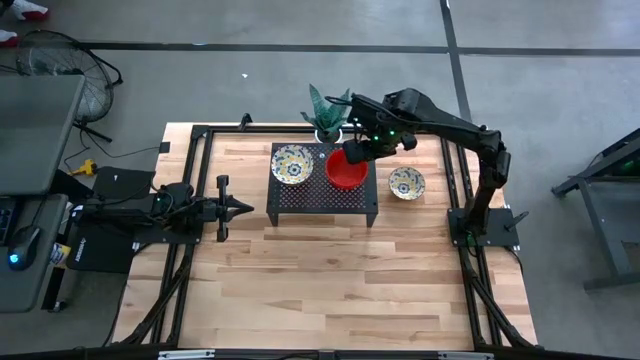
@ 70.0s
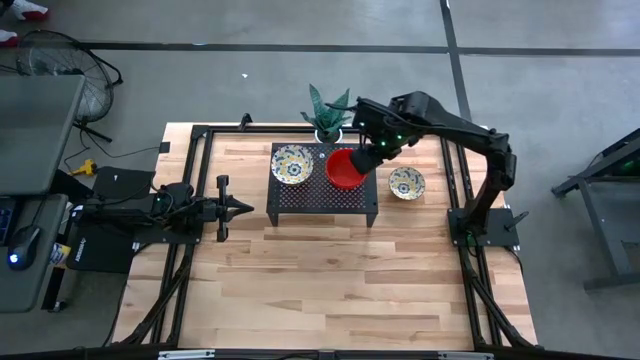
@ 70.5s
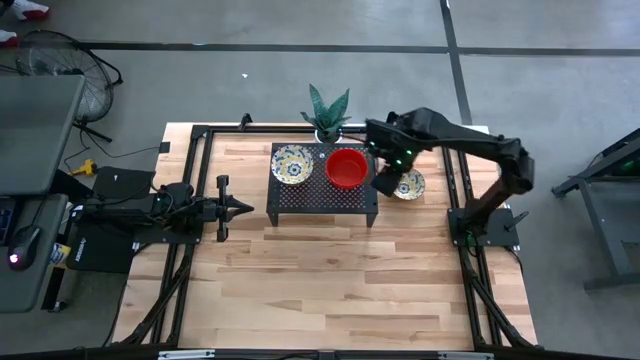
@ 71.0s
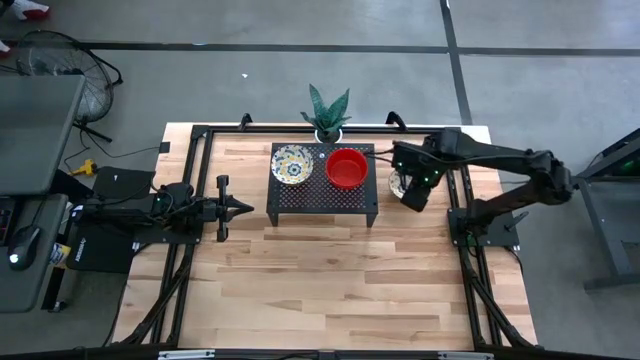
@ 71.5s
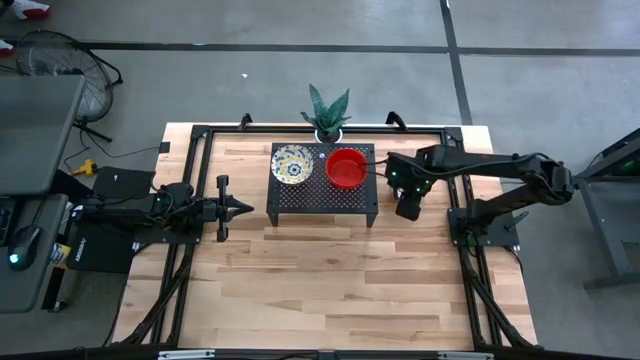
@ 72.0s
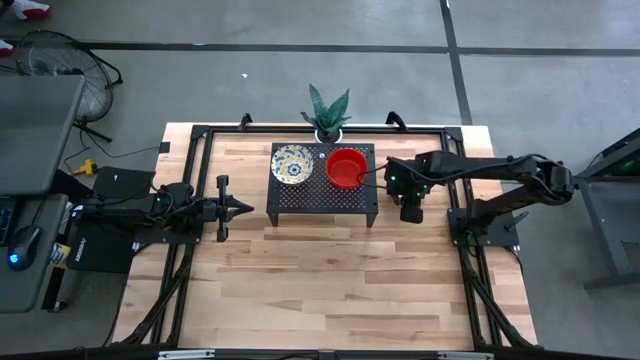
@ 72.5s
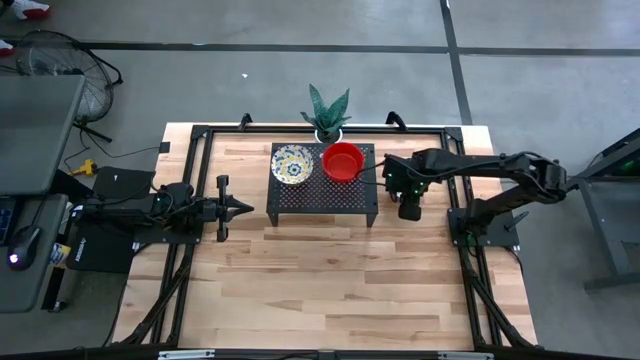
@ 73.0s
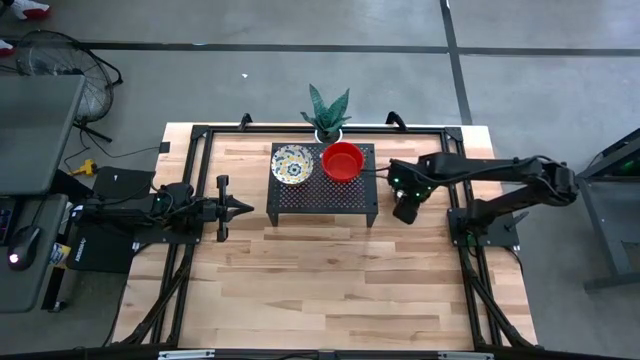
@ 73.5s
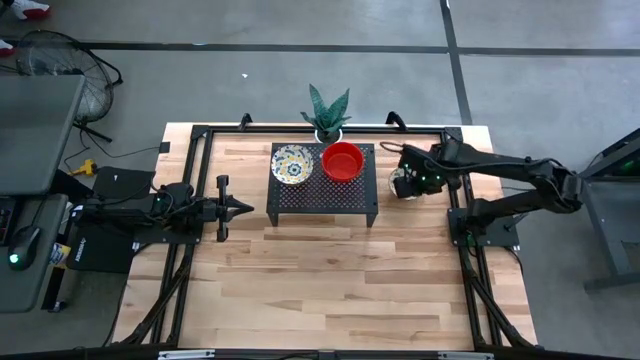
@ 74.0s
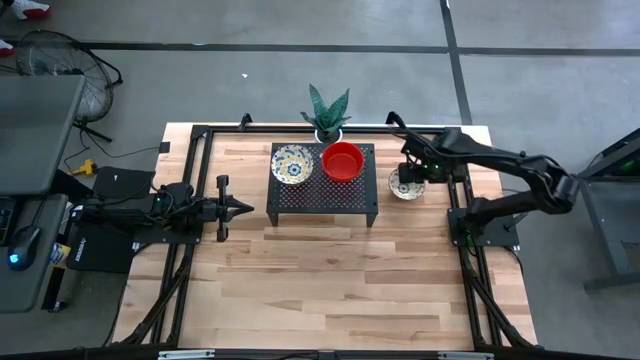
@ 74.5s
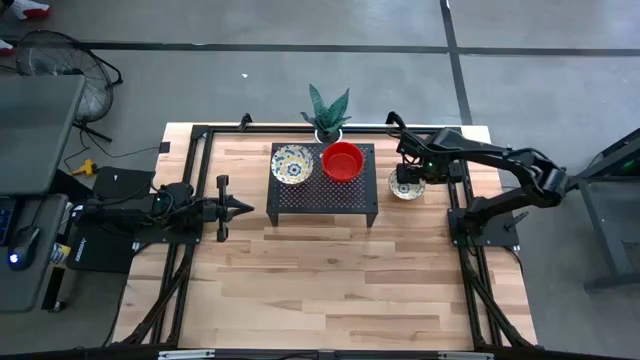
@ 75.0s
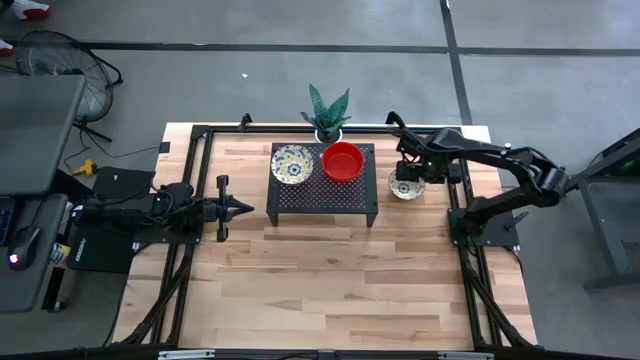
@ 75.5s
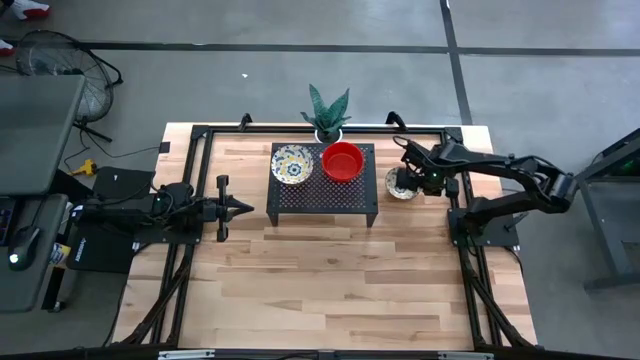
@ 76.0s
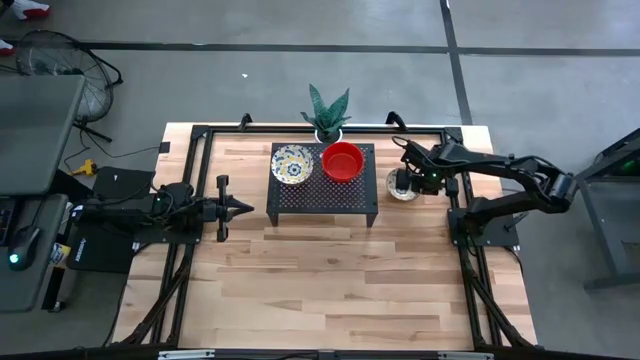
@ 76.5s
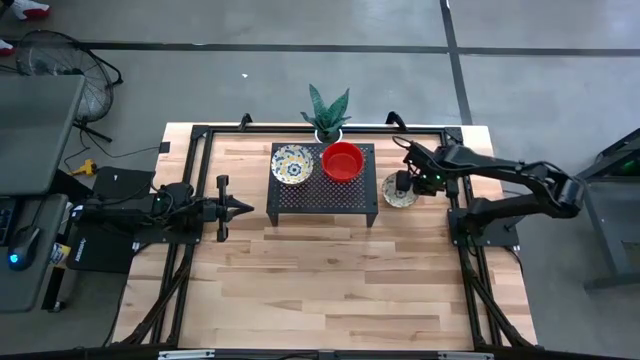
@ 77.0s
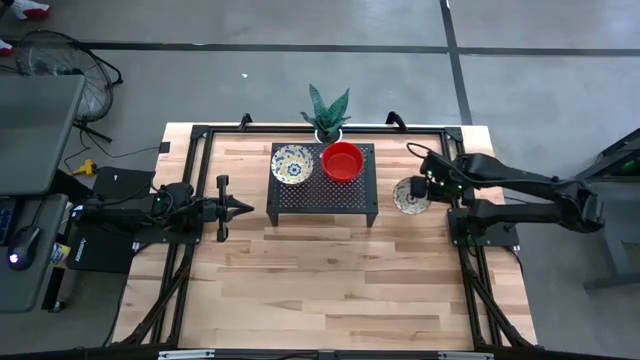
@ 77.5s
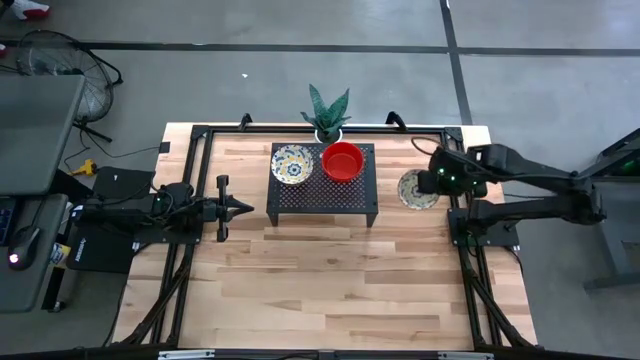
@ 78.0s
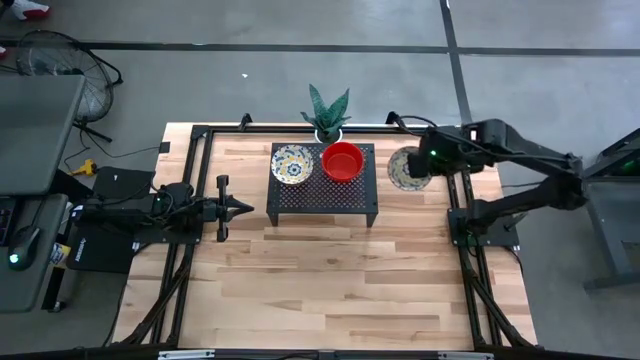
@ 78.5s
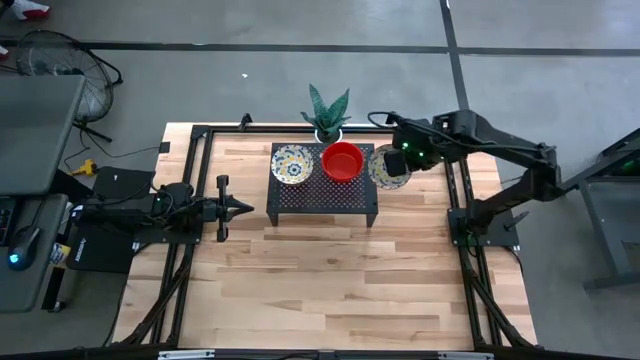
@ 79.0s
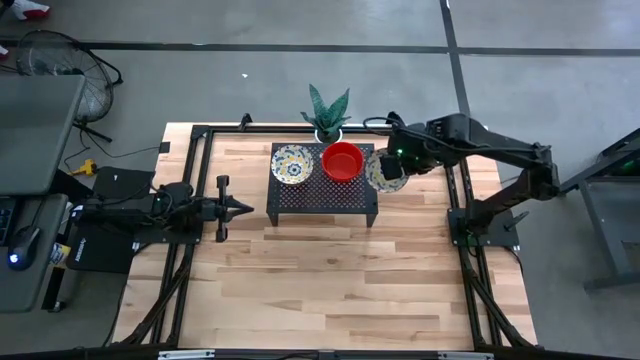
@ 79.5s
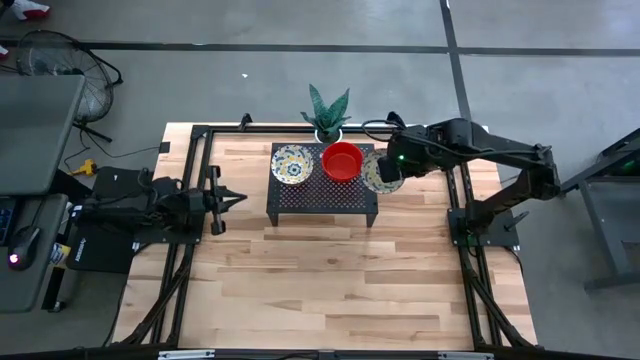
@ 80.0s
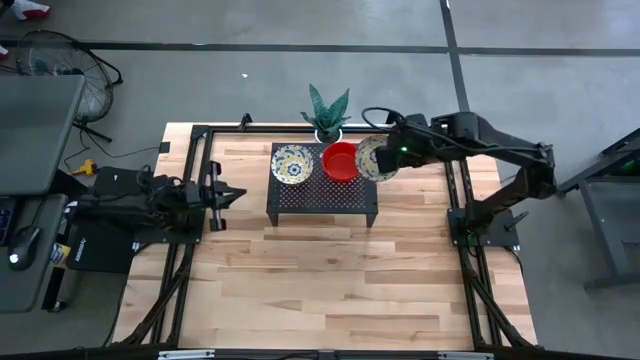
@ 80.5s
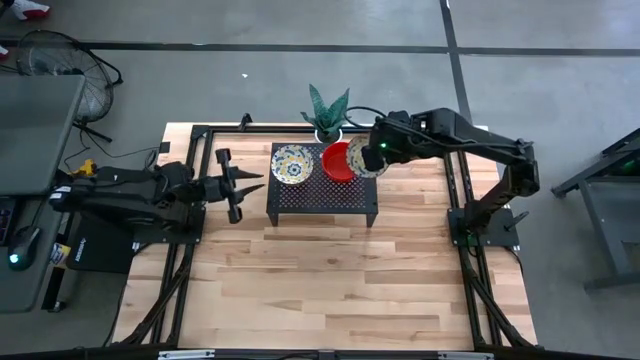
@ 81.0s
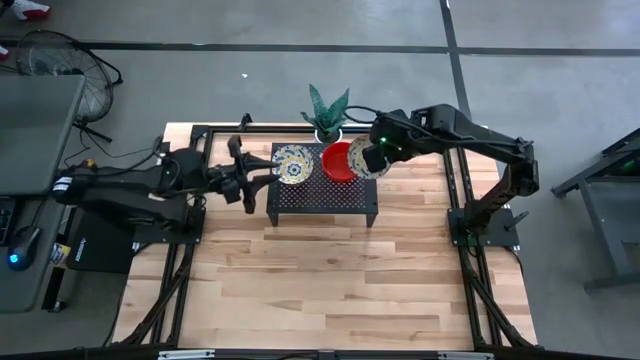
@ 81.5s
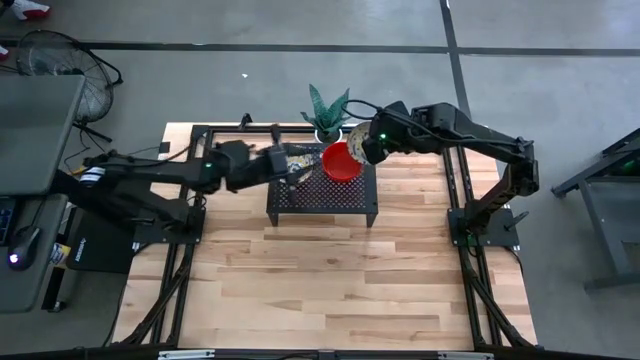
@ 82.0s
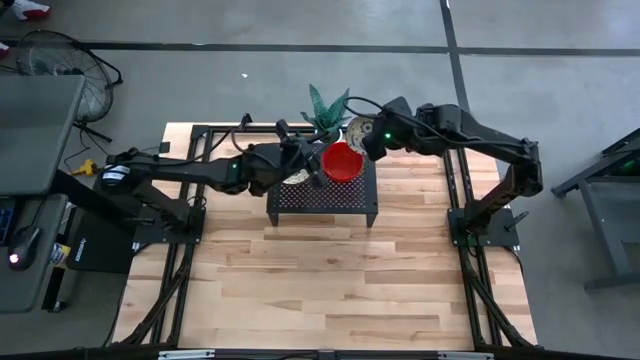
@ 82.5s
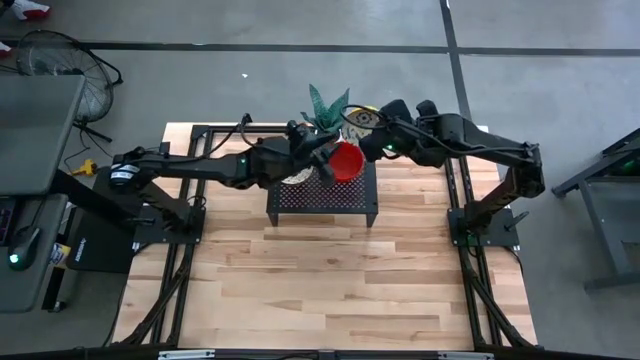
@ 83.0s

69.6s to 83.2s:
Task: Pick & Place Mini bowls
Stack the yellow bowl on the yellow bowls on the shelf

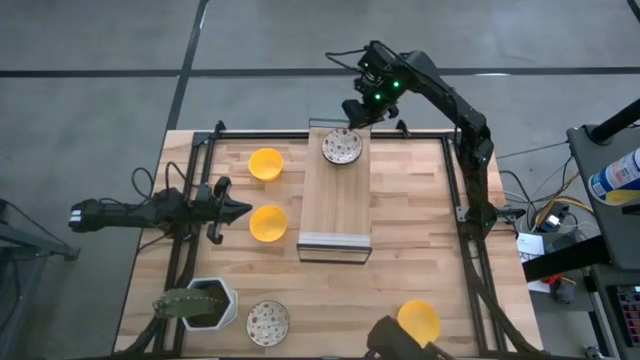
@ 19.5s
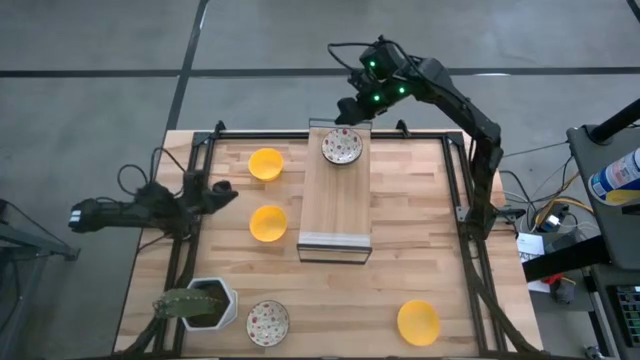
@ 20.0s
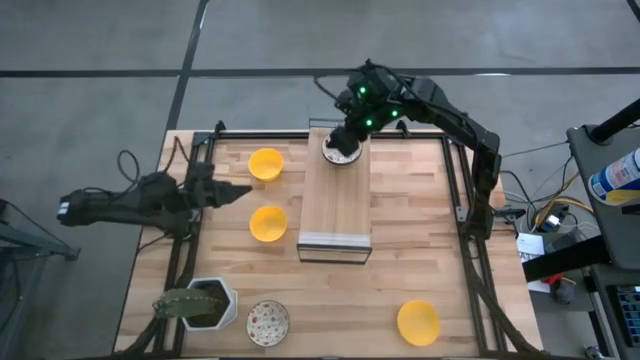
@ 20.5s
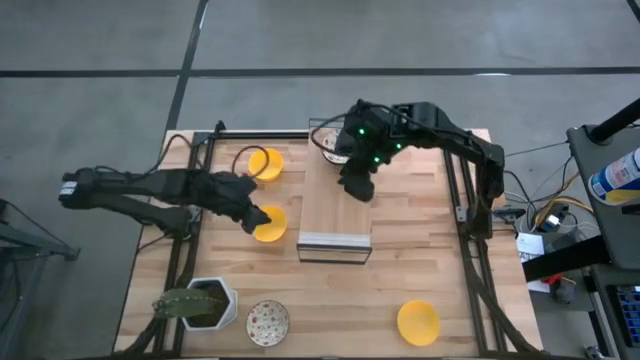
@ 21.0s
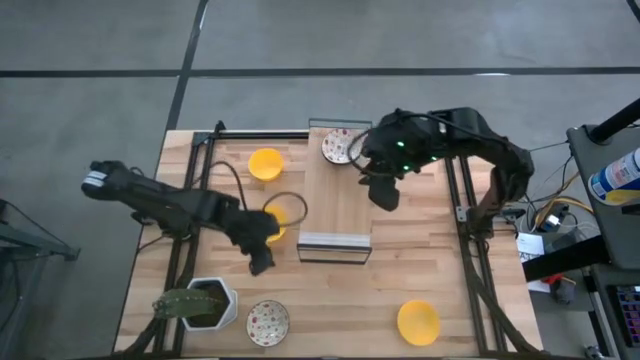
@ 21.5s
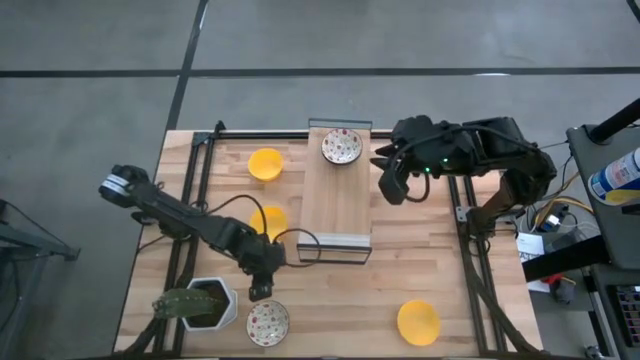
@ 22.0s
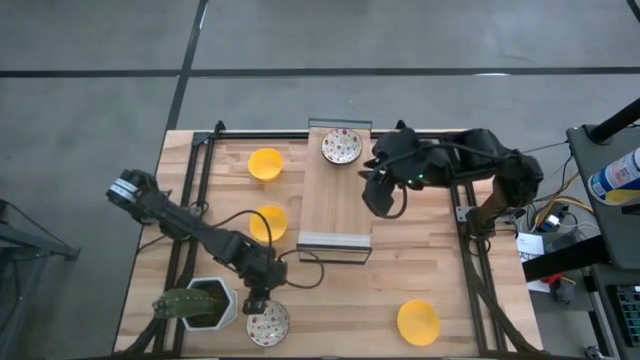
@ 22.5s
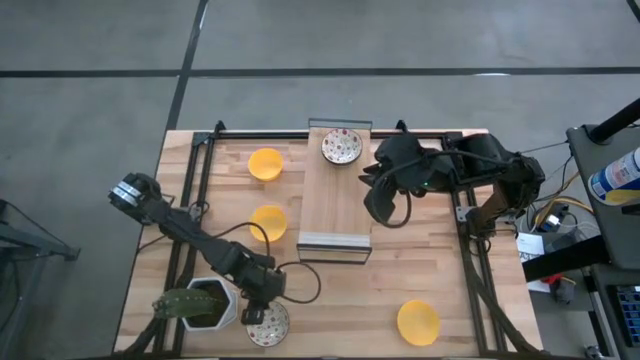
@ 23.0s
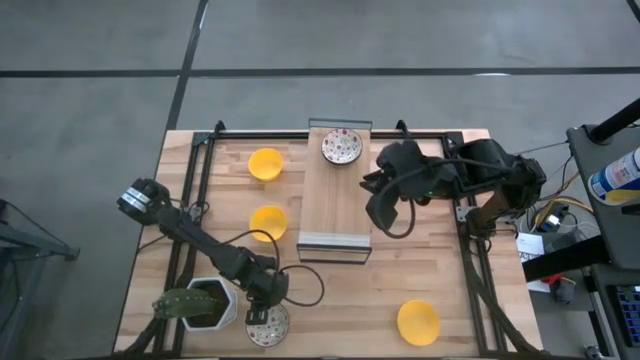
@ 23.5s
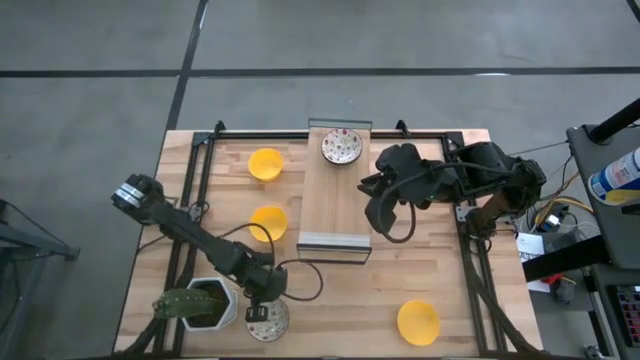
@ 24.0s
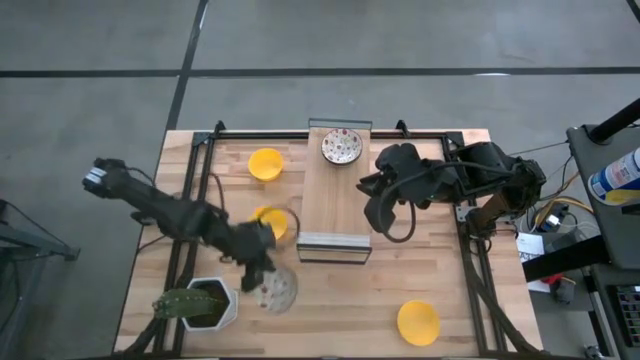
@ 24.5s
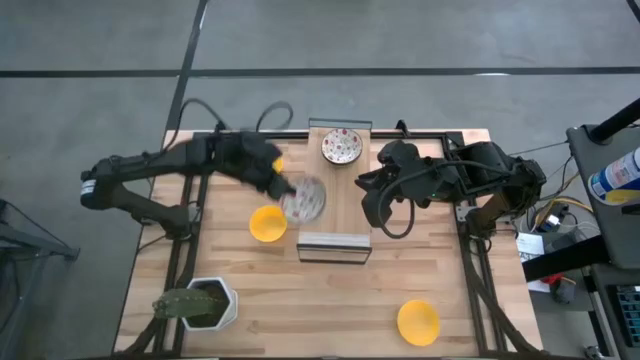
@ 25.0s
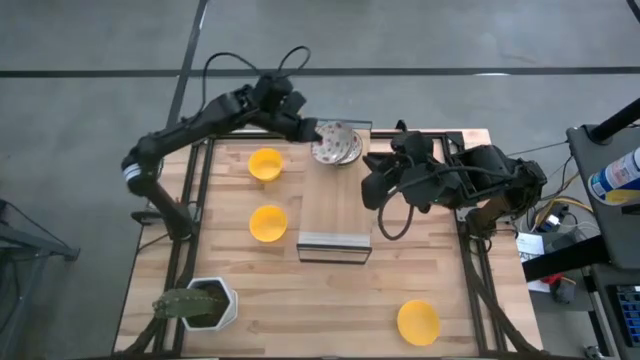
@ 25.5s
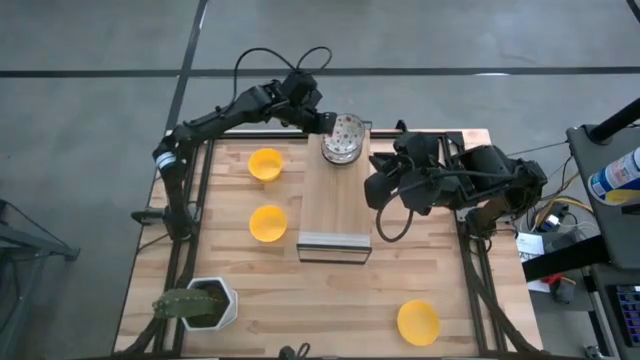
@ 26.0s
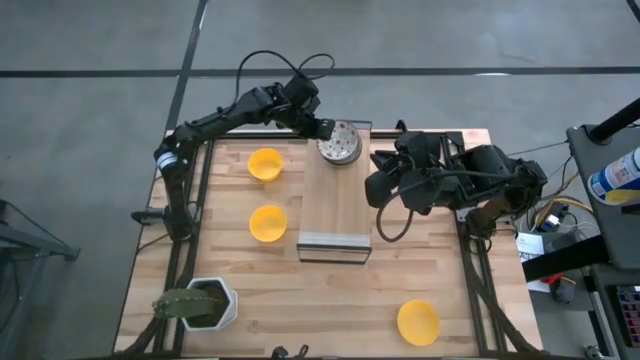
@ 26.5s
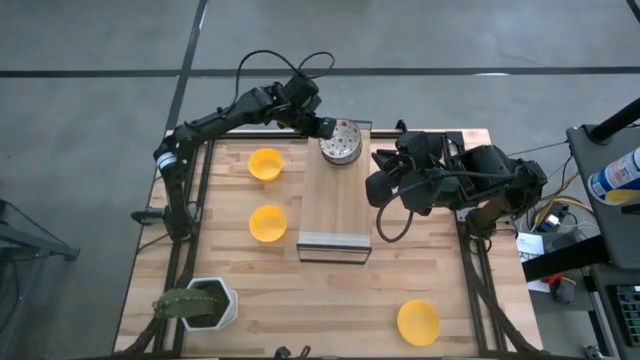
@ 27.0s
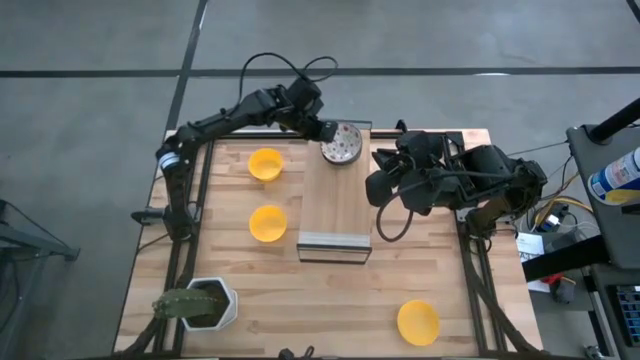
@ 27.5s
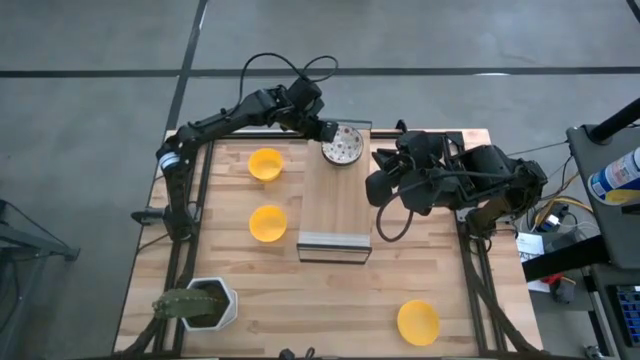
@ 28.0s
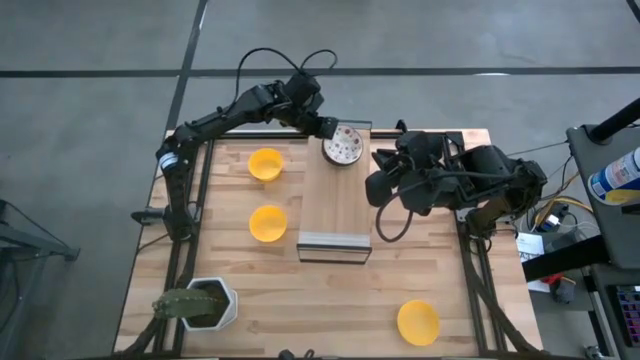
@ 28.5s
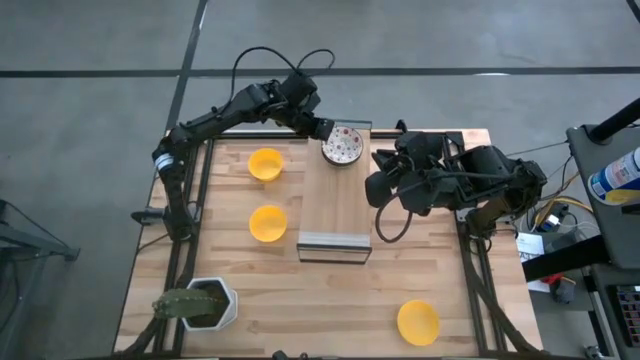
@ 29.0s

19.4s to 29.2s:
Task: Pick & Place Mini bowls
Stack the white patterned bowl on the white patterned bowls on the shelf
